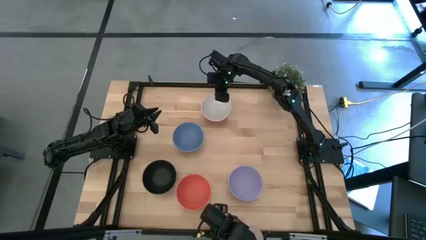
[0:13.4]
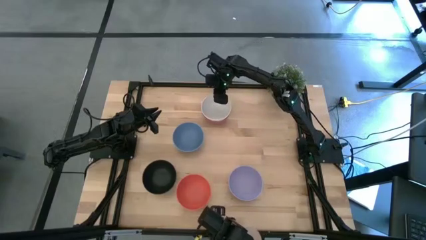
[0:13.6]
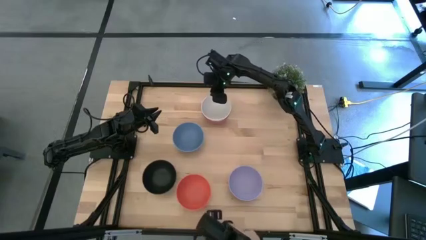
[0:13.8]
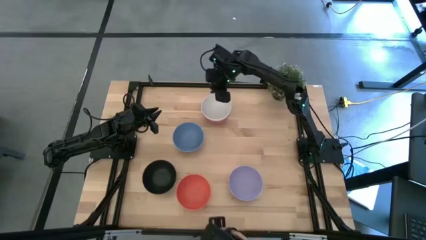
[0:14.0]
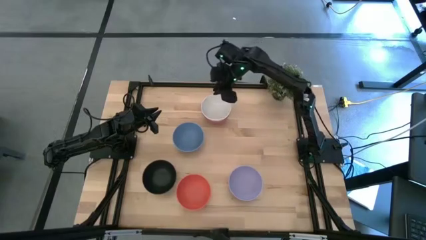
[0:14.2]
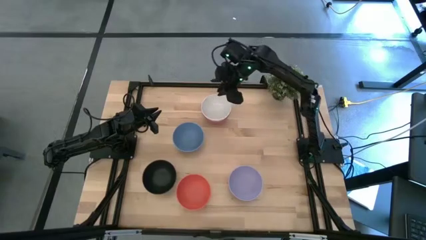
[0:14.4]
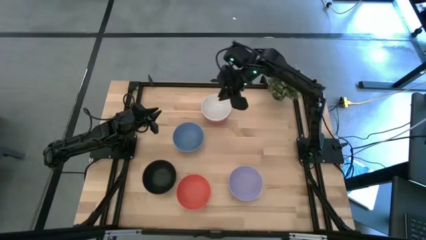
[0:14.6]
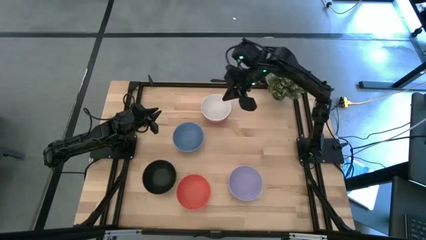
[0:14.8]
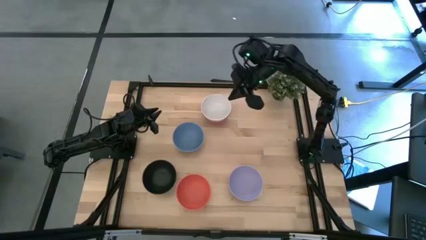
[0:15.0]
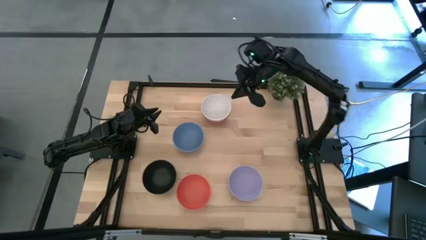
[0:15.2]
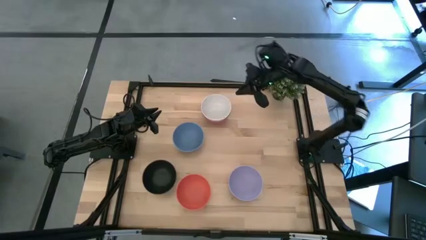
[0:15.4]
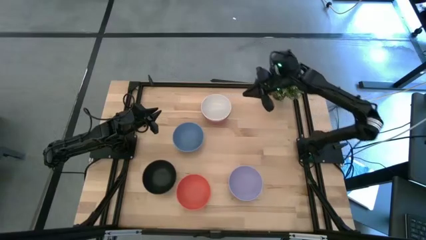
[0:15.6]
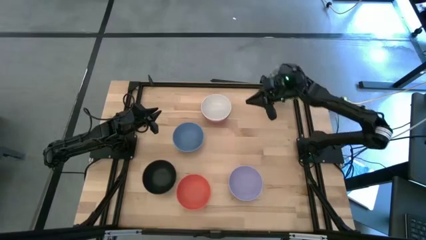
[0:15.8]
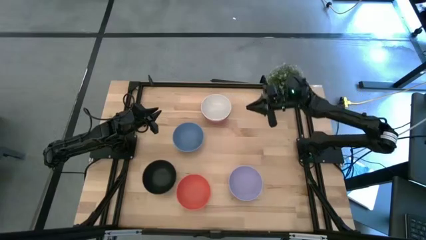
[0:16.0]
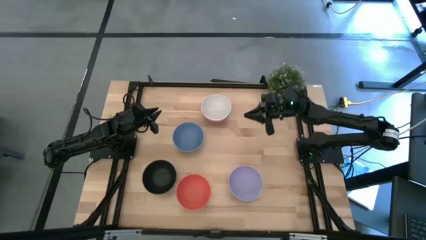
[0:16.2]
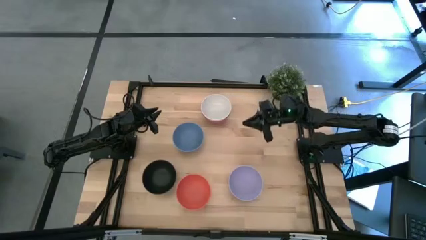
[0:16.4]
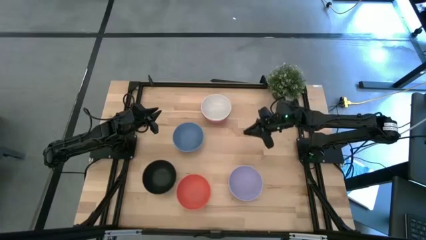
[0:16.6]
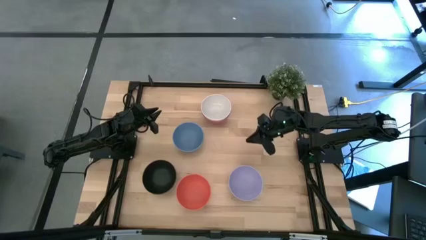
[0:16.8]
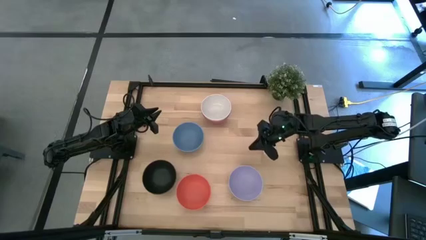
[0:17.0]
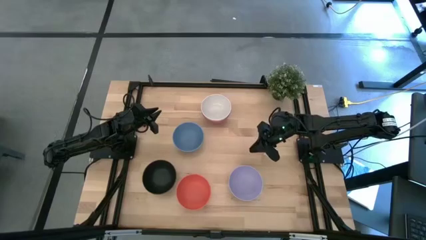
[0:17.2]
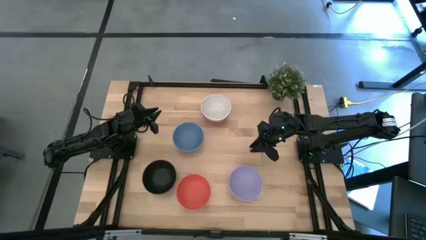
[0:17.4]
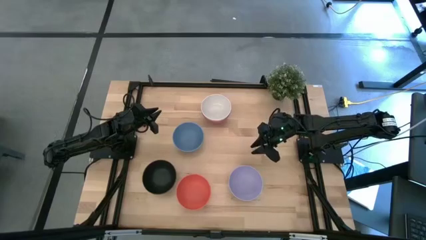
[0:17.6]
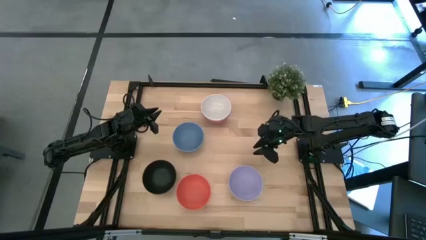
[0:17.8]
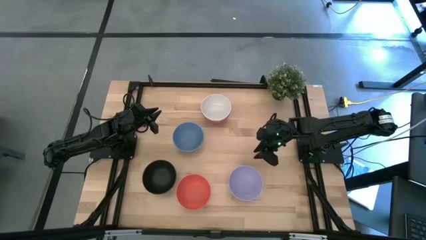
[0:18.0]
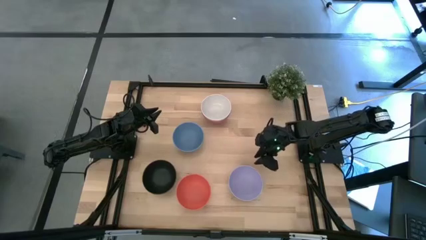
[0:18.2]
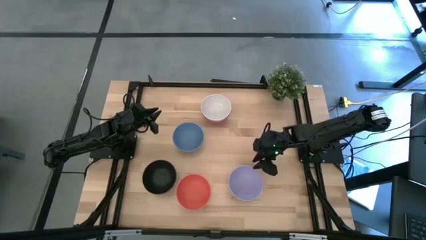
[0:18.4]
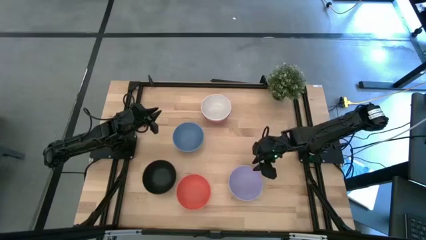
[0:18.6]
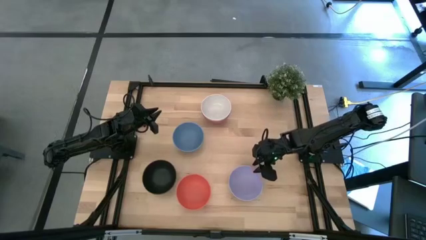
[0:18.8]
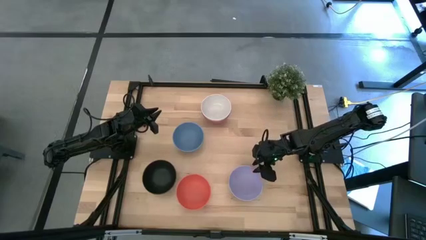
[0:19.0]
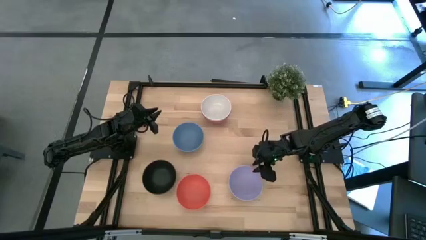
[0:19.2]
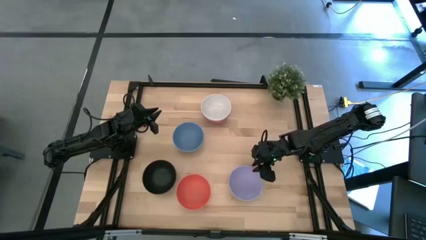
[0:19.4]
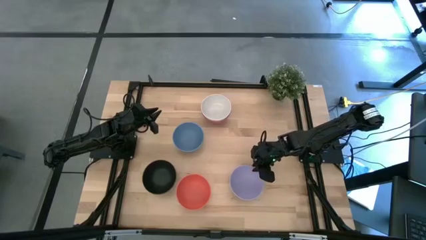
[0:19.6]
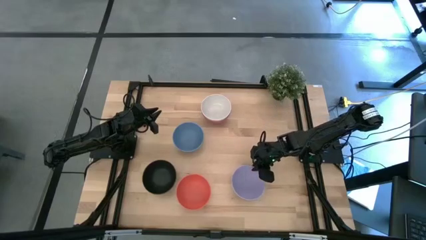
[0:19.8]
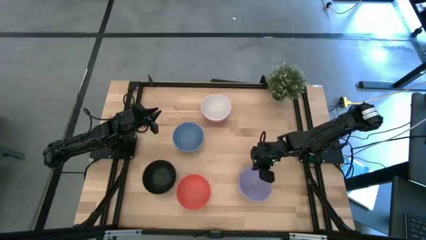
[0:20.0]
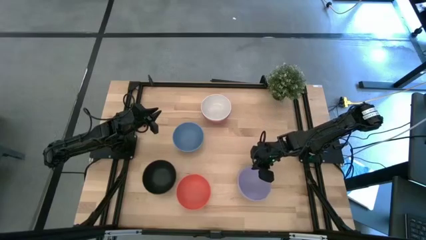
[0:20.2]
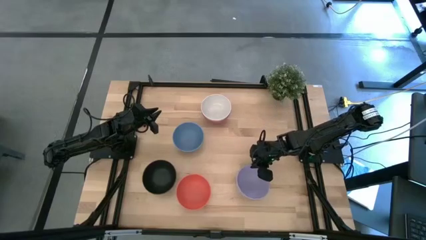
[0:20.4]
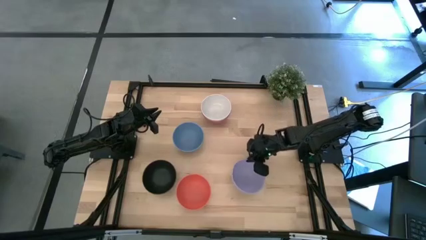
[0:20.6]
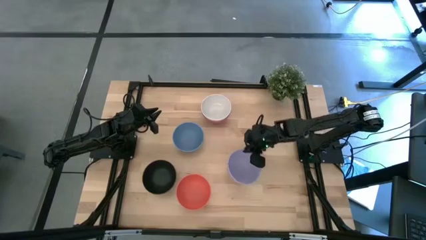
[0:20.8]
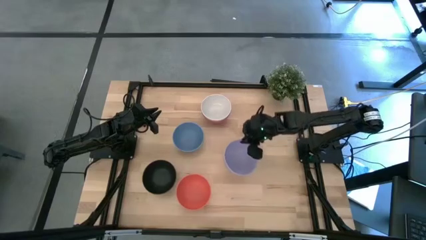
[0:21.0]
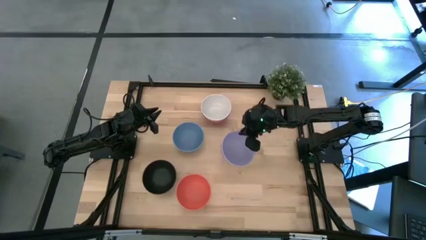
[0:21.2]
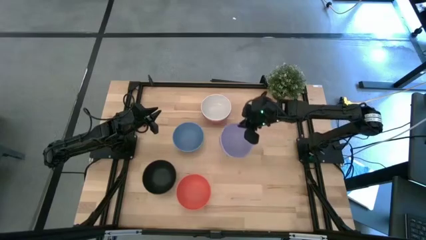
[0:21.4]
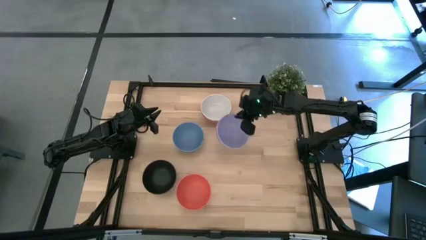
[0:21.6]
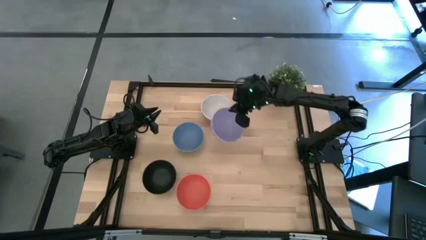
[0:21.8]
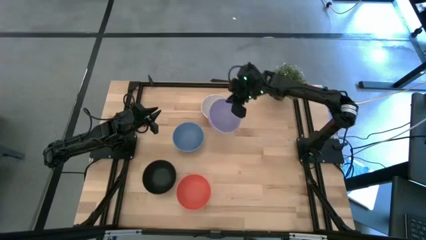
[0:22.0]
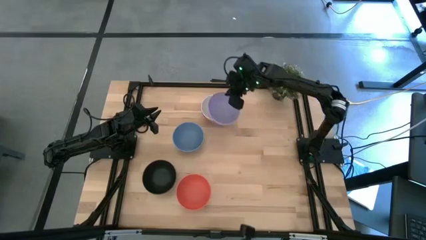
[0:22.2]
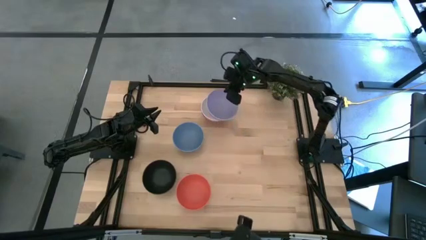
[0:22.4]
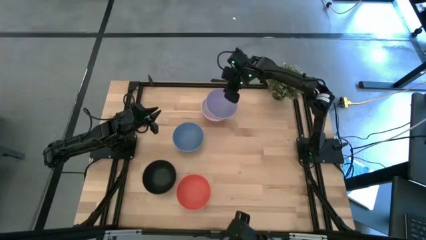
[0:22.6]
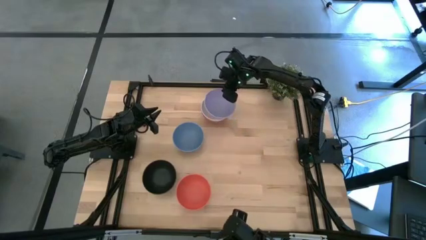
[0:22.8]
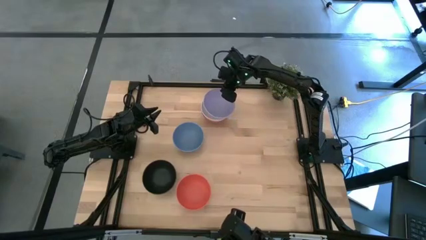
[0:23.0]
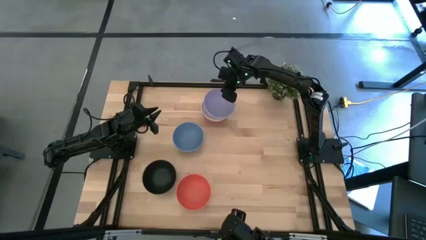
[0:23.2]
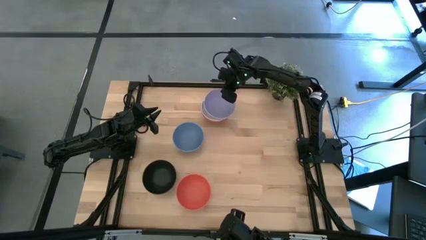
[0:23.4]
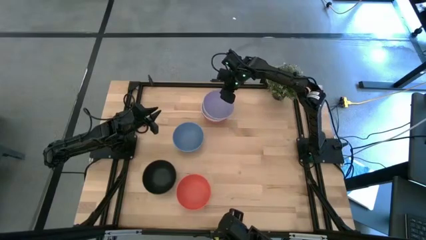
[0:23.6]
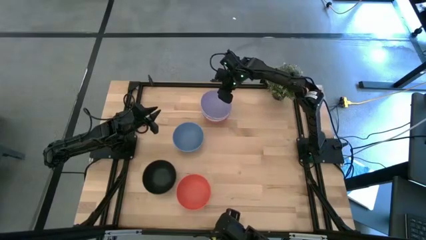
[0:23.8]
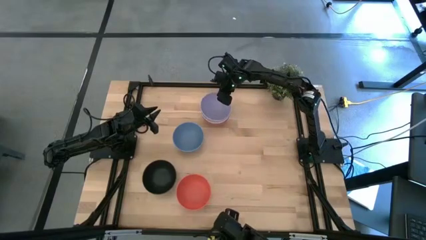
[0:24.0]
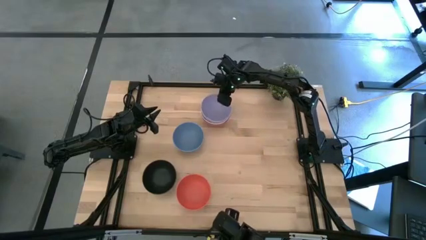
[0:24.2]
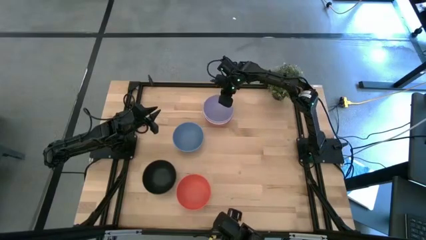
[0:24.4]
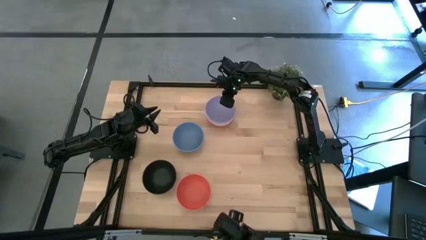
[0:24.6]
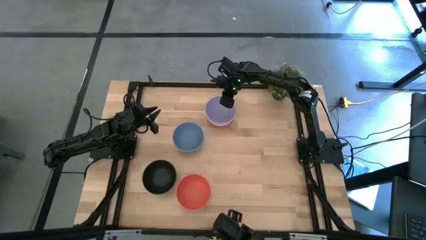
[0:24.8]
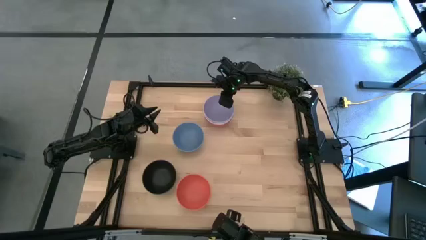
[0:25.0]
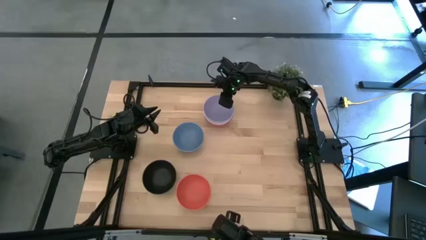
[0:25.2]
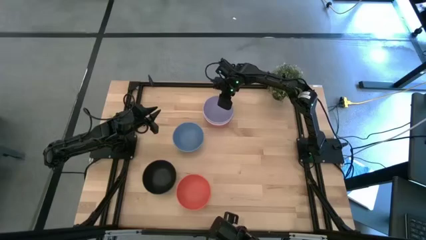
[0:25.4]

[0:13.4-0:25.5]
Task: Nest bowls inside each other
Stack the purple bowl on top of the white bowl

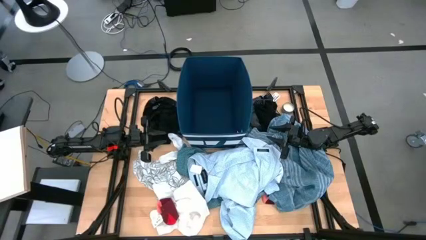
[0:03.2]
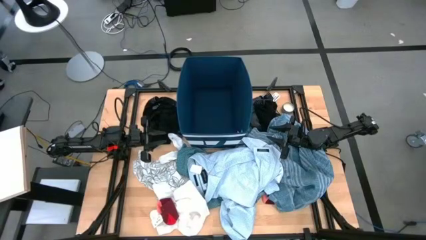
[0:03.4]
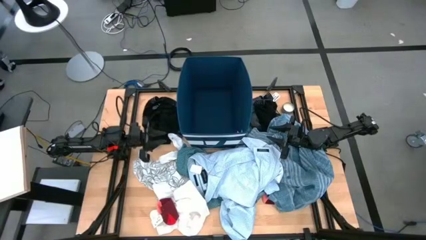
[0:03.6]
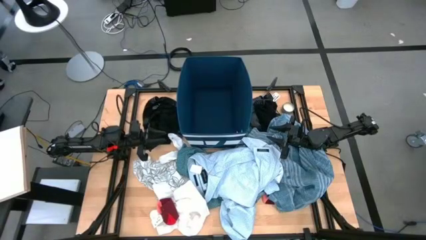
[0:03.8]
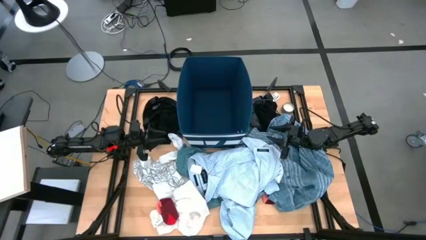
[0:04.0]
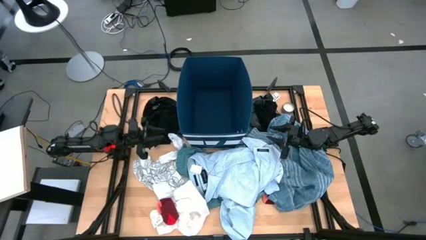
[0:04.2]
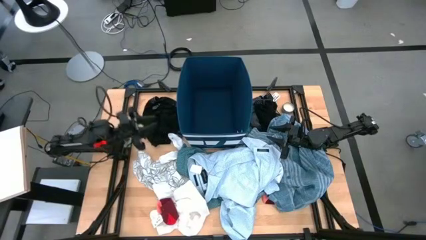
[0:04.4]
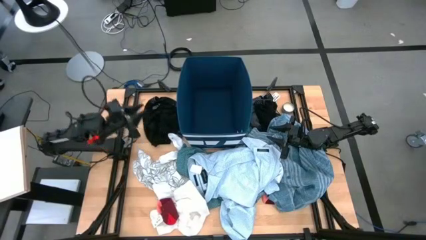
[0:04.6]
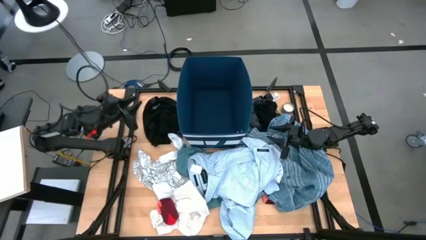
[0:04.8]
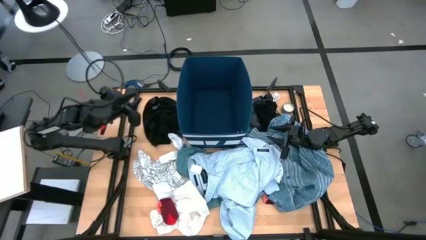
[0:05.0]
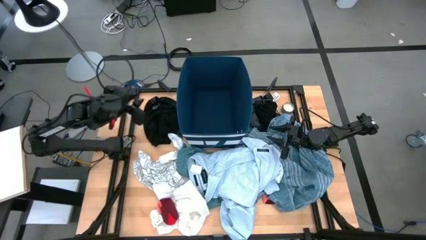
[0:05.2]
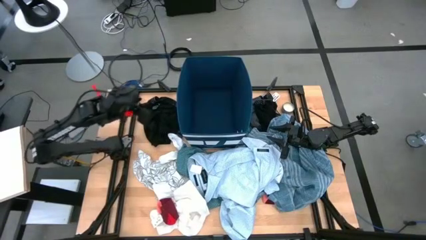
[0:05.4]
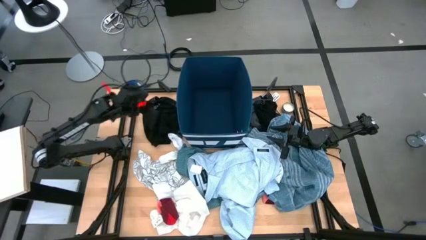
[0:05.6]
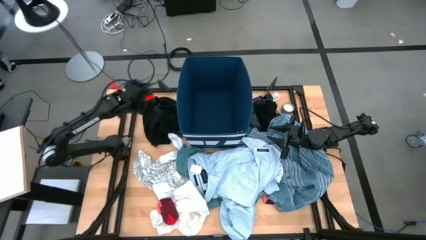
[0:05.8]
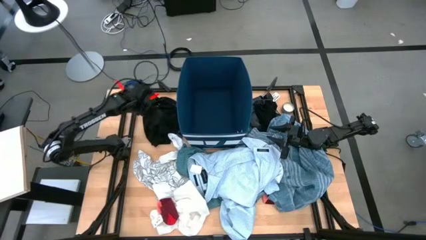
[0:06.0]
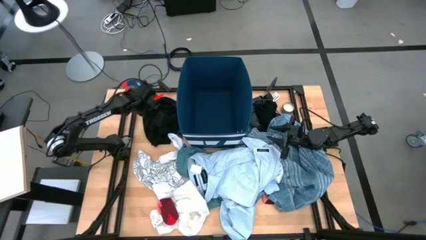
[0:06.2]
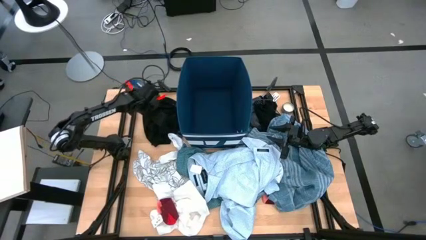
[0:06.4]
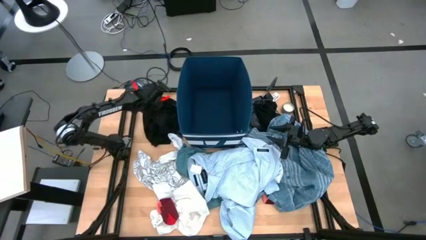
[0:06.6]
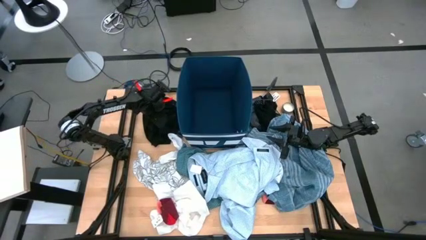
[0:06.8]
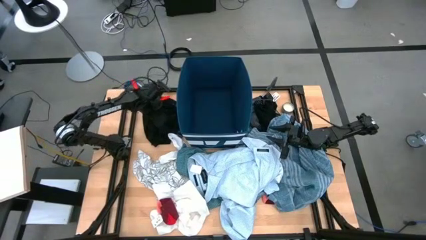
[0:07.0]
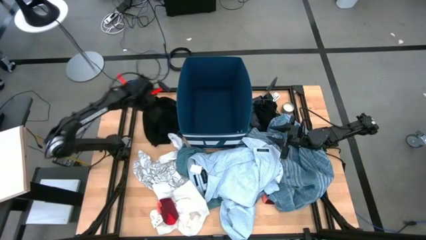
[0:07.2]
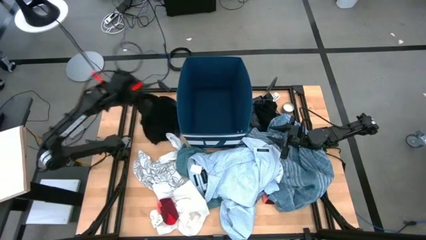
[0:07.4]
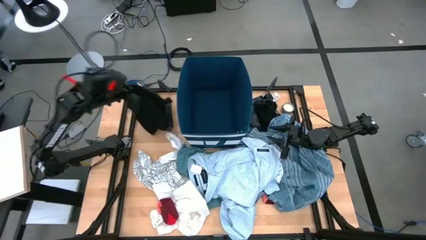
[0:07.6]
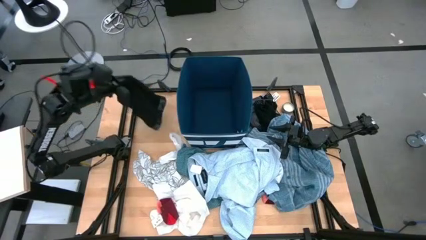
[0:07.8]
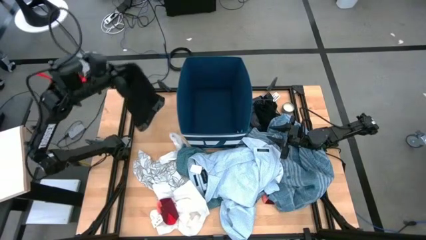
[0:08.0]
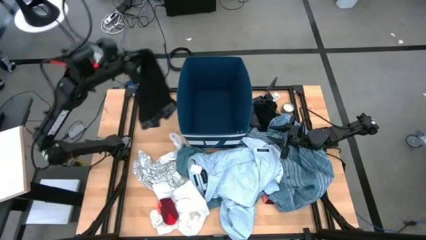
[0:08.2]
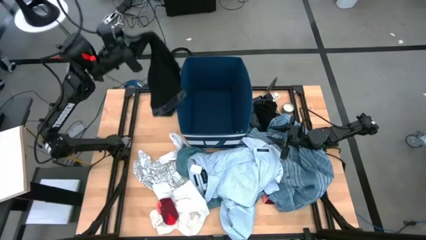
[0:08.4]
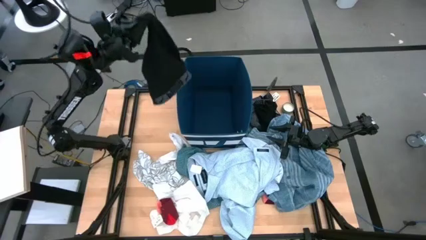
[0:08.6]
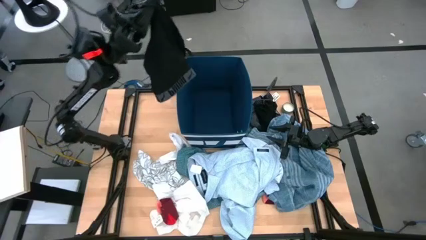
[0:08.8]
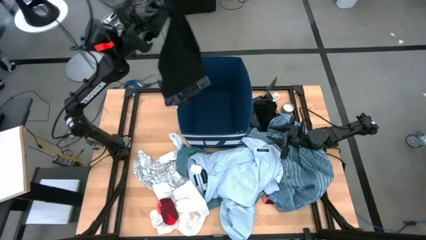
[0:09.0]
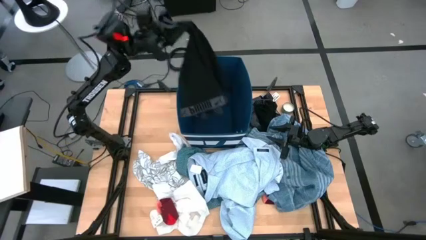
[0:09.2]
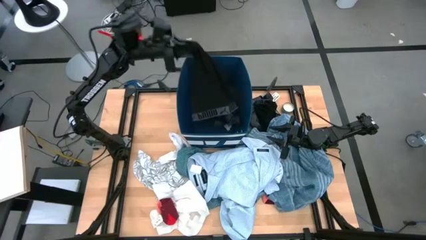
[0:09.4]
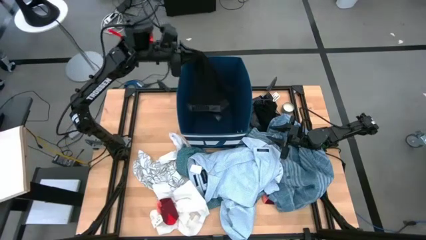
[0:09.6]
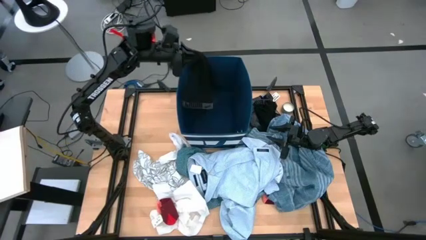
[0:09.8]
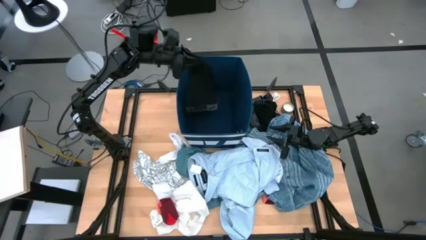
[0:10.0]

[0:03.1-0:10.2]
Task: Sort clothes
Put the left black boxer into the blue bin
